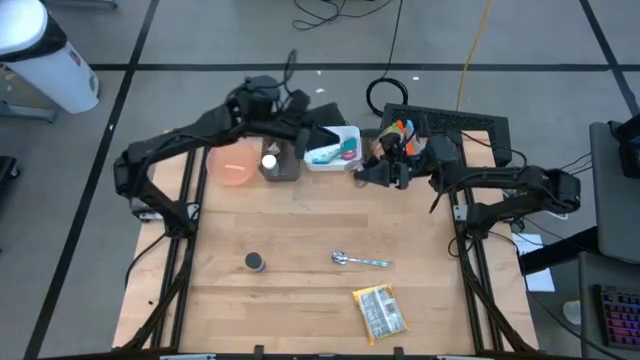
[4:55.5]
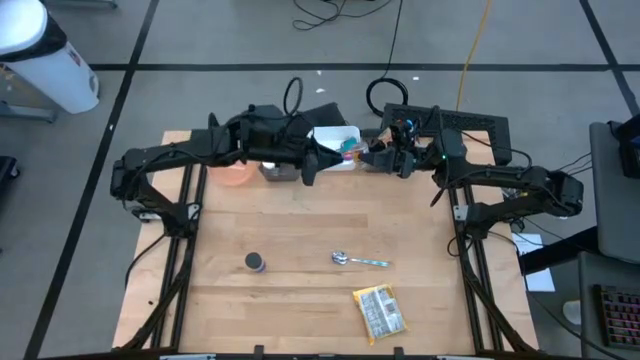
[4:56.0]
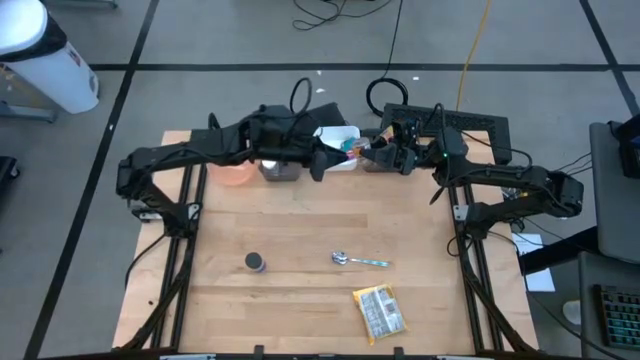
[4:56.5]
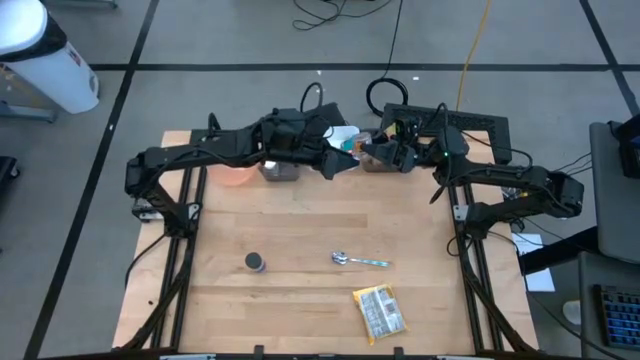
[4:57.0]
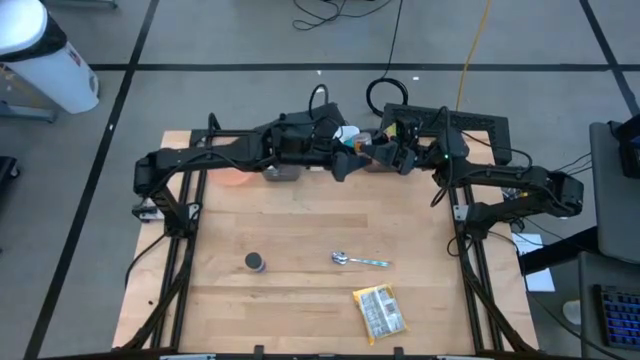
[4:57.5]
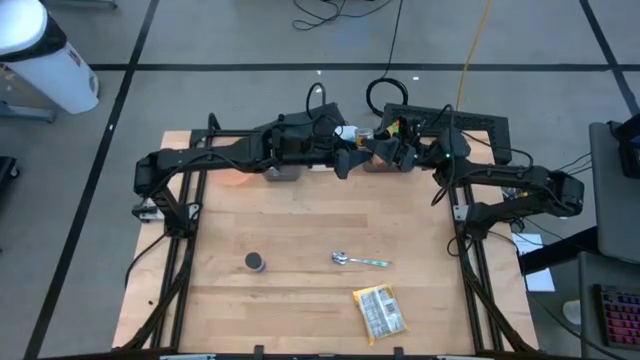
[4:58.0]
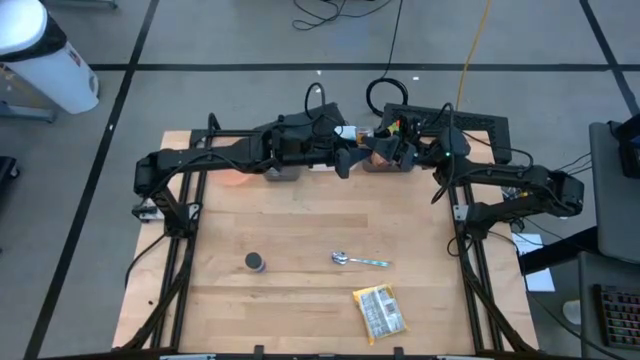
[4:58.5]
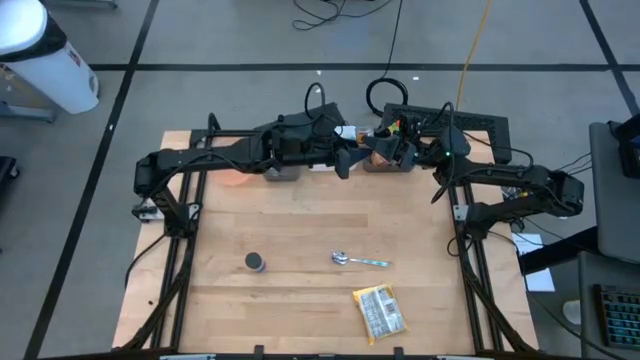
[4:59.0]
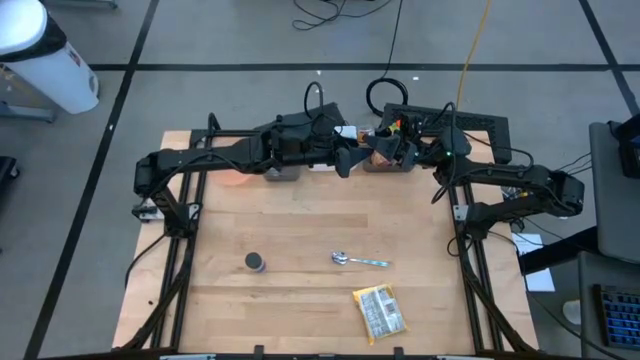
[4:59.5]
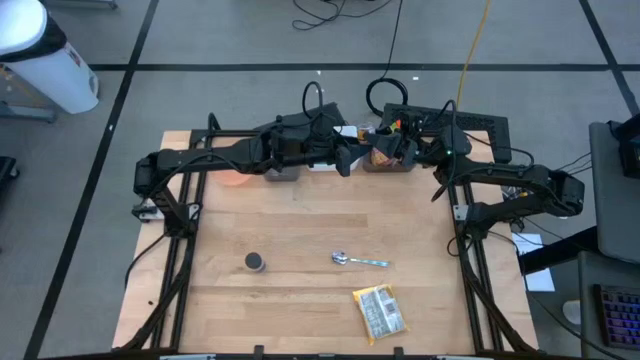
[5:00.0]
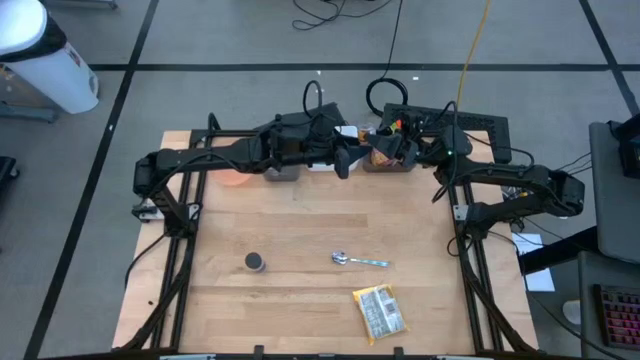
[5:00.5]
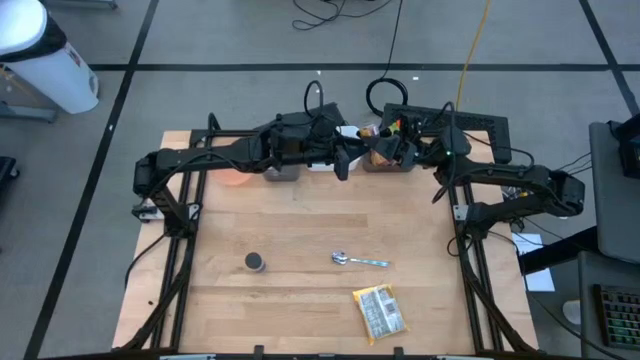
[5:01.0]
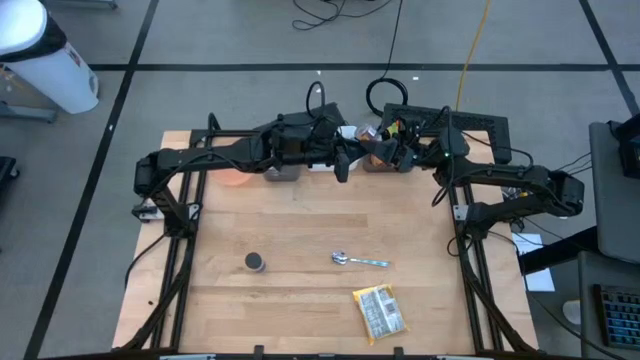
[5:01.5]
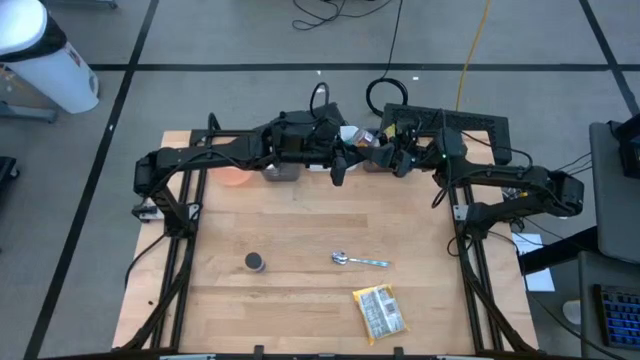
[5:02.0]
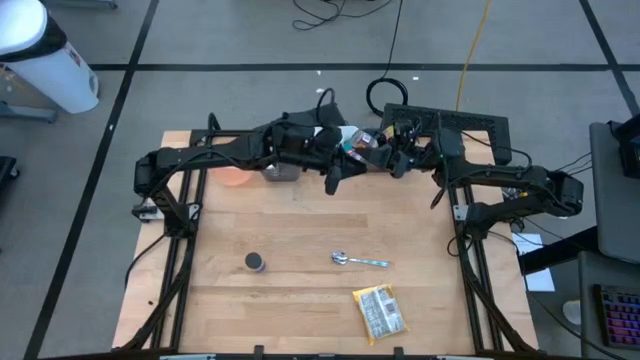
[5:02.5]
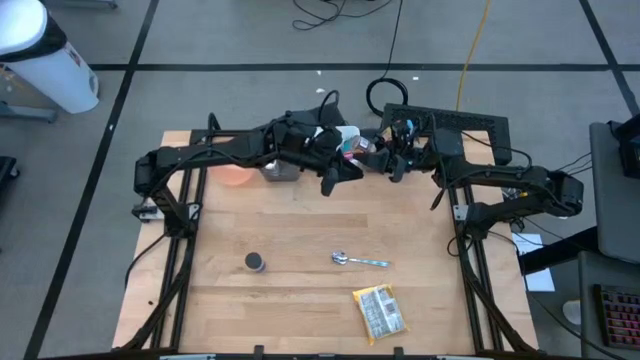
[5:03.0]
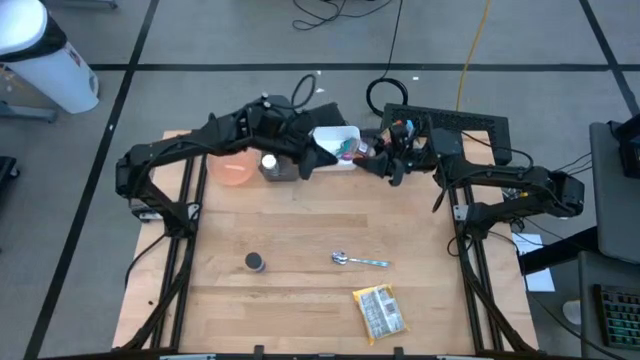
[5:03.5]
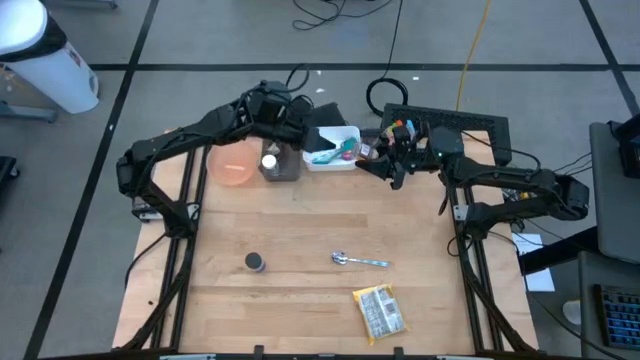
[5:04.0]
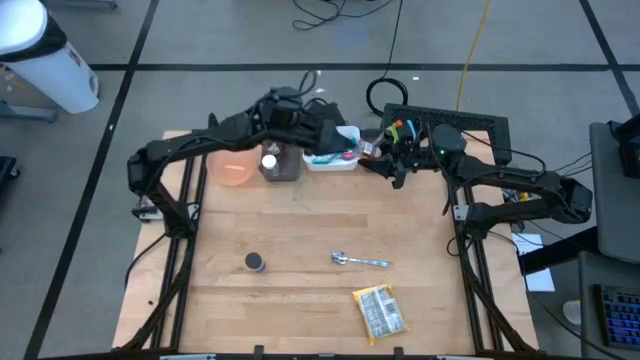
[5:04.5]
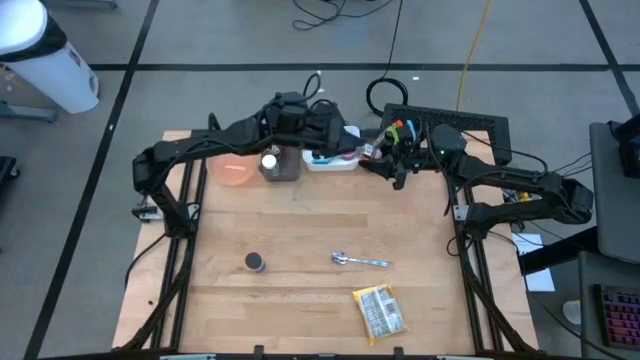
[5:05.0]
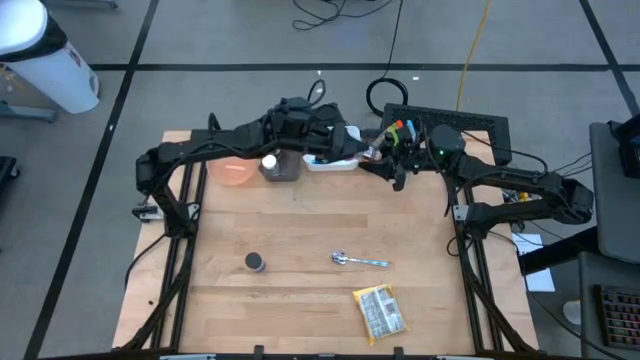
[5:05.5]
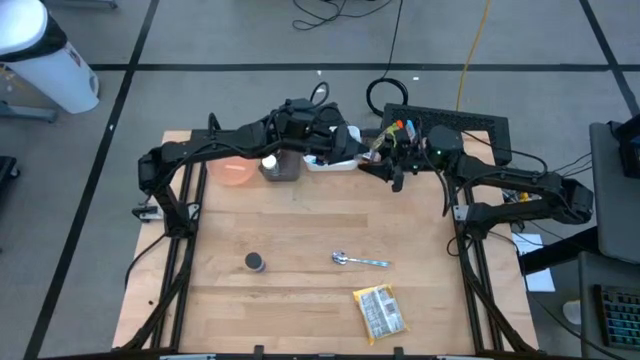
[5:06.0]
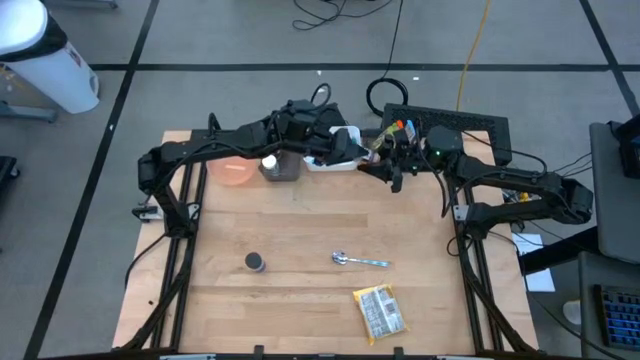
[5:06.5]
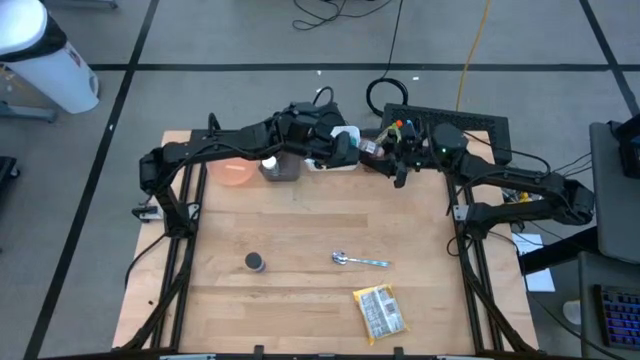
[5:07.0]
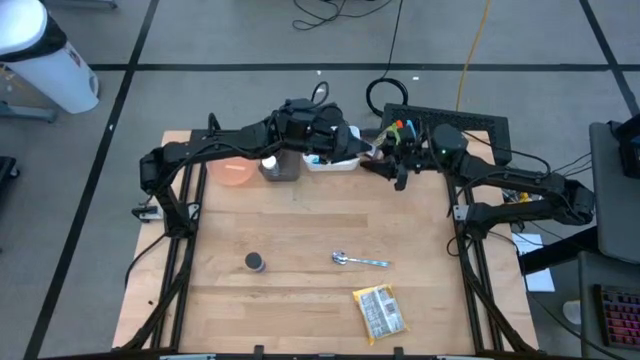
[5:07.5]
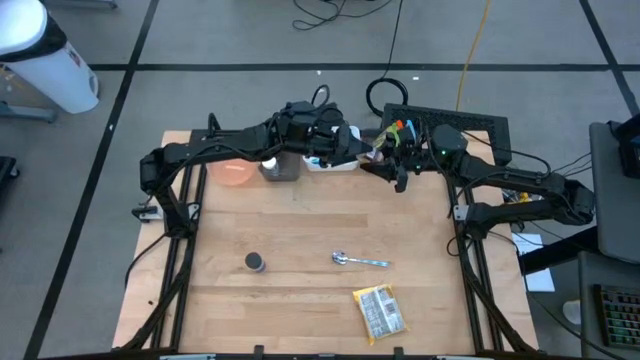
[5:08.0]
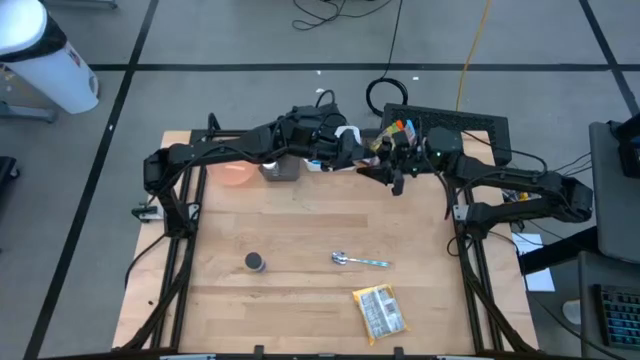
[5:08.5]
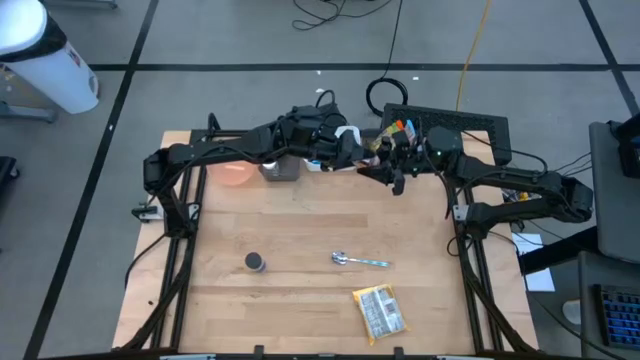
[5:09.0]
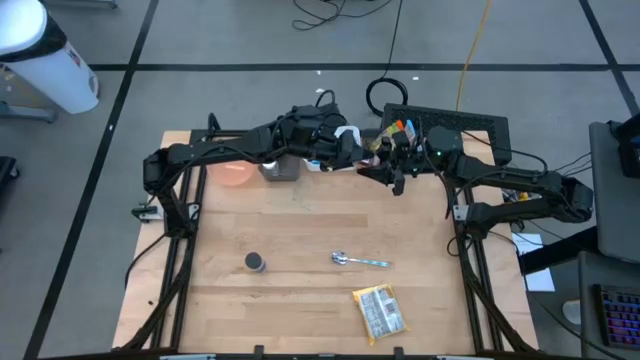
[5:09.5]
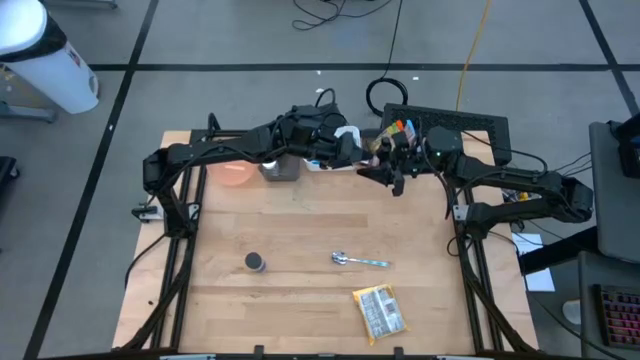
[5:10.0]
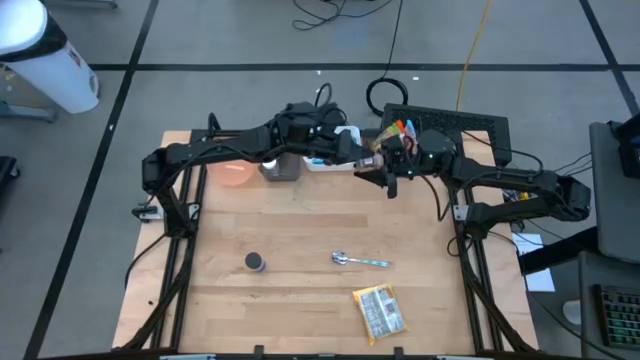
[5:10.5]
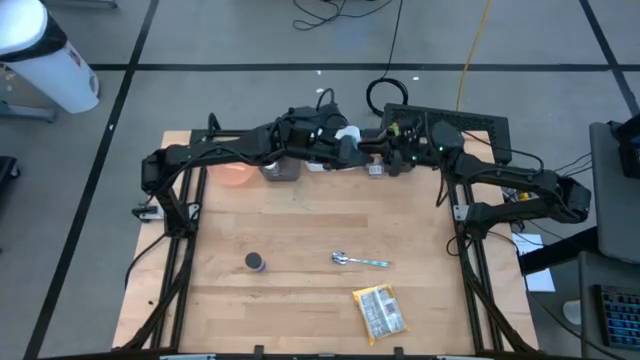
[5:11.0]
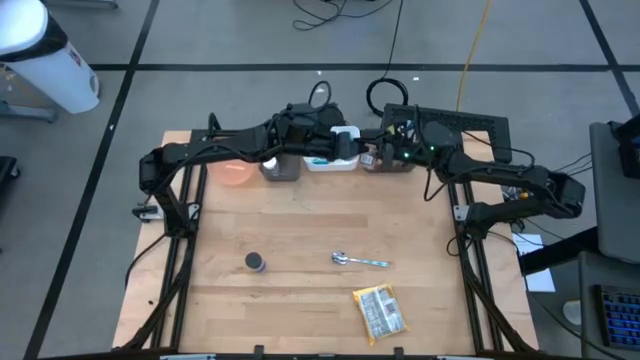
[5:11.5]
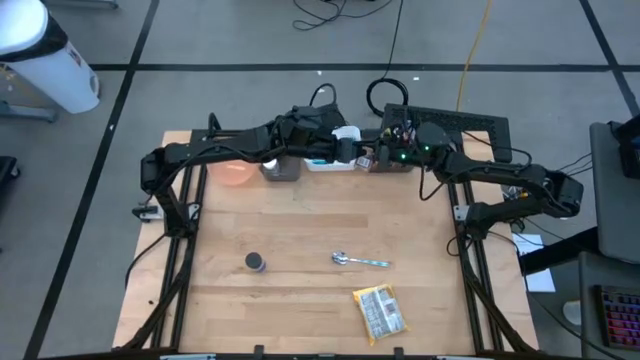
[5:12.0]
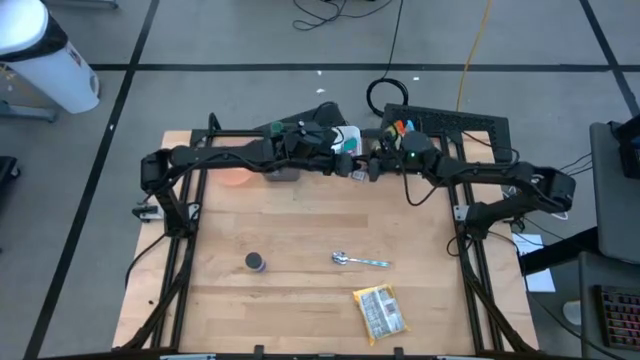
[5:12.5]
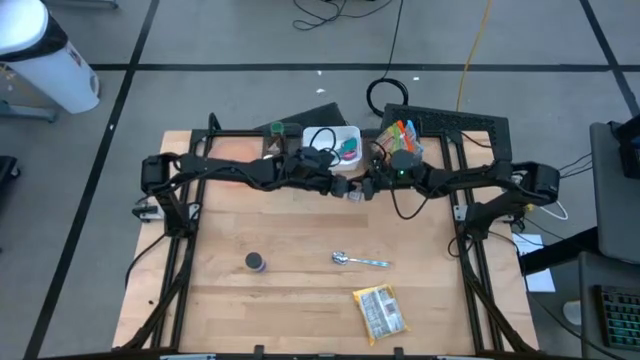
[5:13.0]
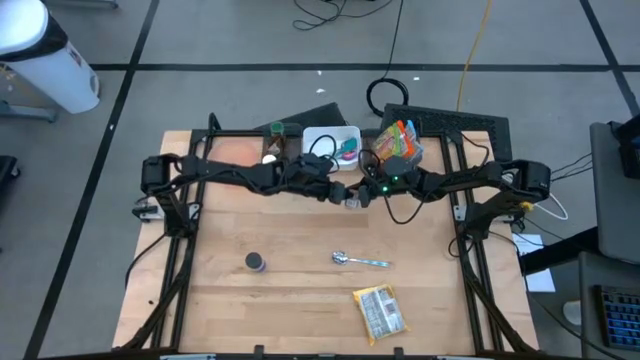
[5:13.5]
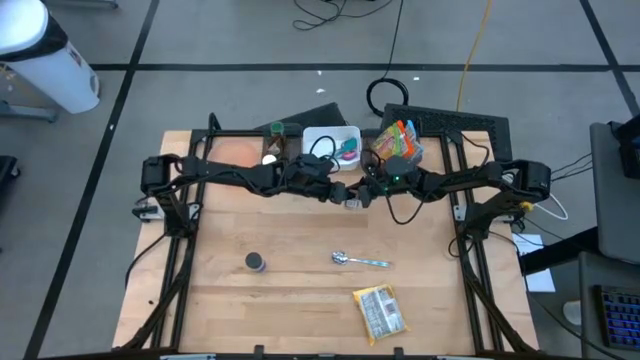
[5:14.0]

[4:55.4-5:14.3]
Task: Pick & Place Food Item
Put the brown seasoning bottle into the left black bin
